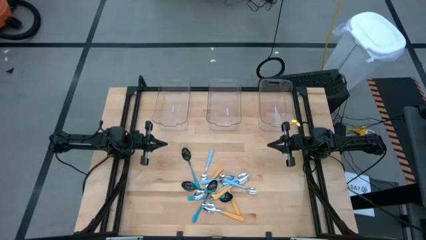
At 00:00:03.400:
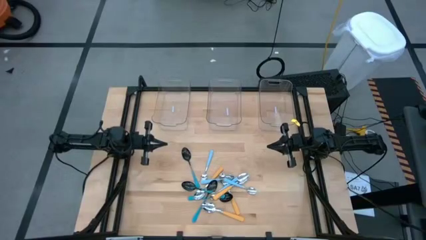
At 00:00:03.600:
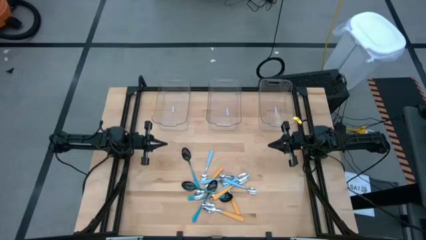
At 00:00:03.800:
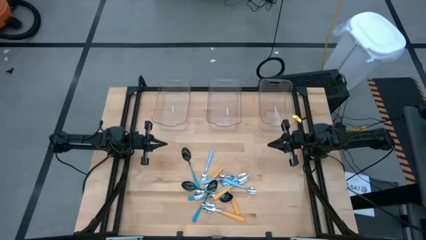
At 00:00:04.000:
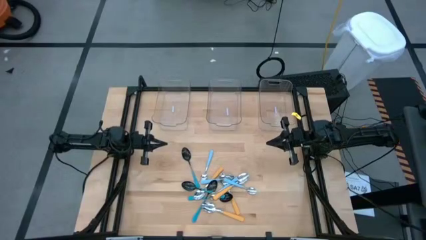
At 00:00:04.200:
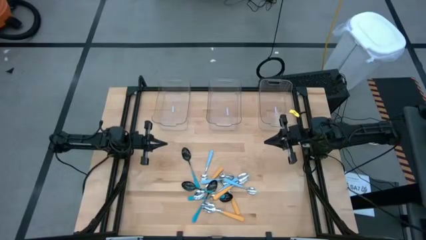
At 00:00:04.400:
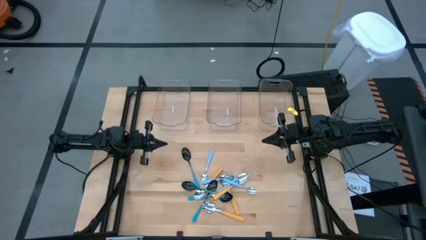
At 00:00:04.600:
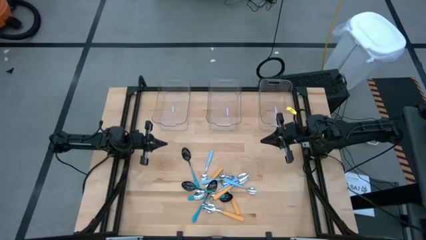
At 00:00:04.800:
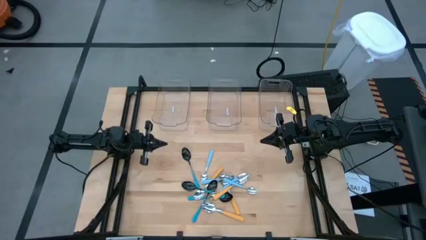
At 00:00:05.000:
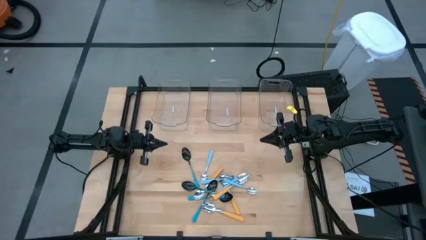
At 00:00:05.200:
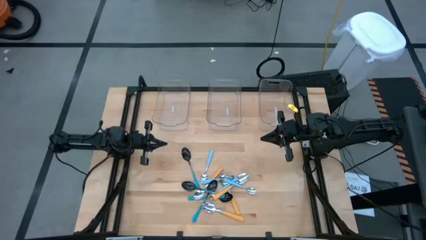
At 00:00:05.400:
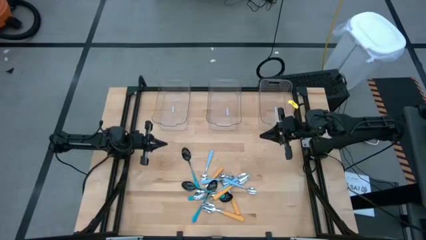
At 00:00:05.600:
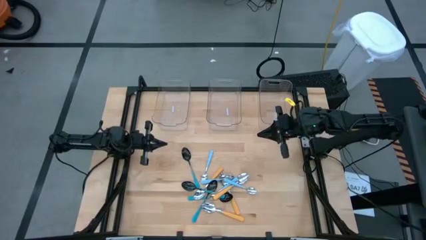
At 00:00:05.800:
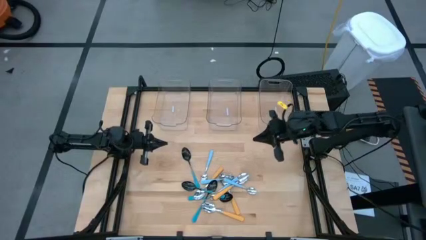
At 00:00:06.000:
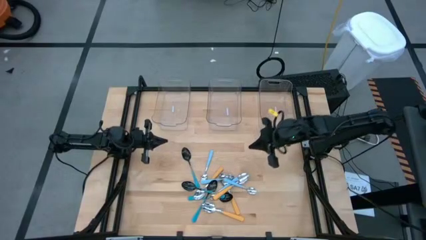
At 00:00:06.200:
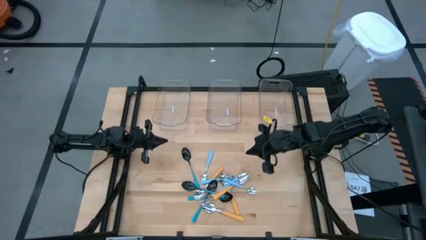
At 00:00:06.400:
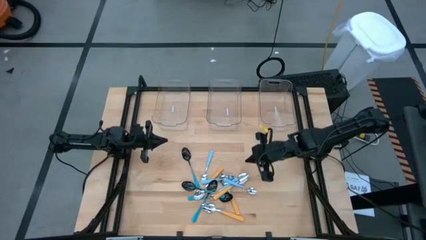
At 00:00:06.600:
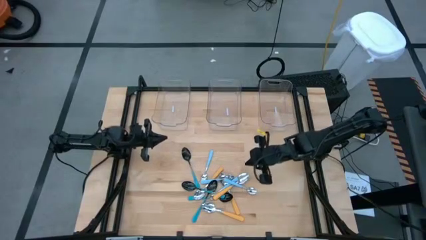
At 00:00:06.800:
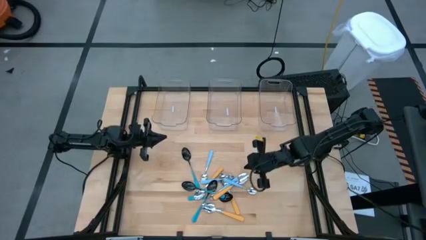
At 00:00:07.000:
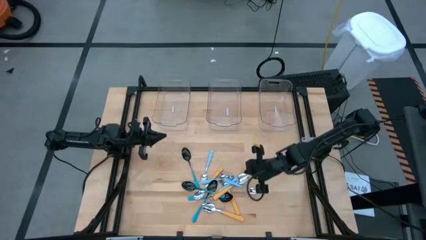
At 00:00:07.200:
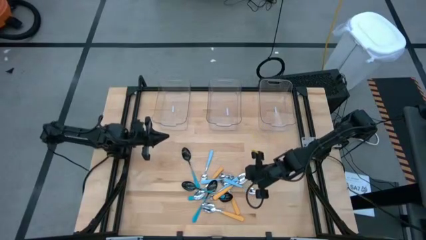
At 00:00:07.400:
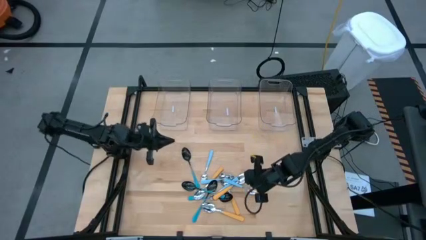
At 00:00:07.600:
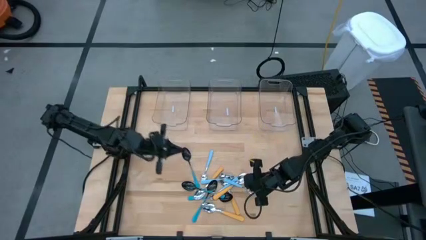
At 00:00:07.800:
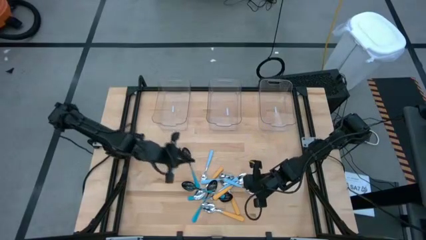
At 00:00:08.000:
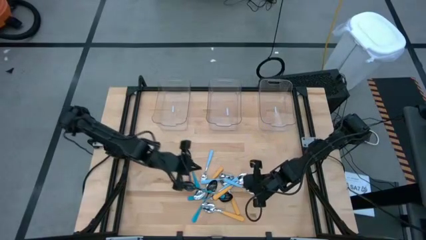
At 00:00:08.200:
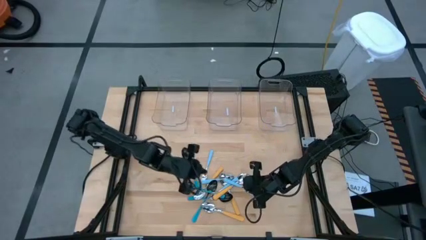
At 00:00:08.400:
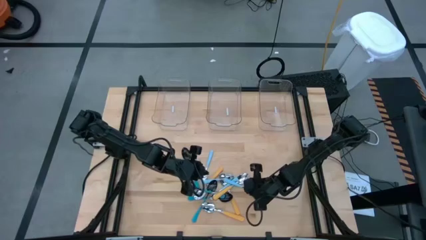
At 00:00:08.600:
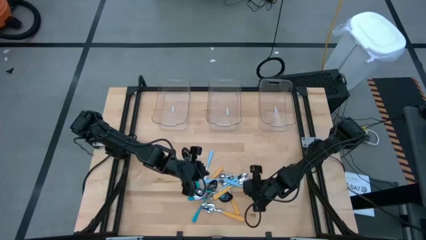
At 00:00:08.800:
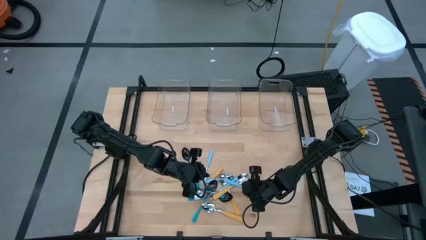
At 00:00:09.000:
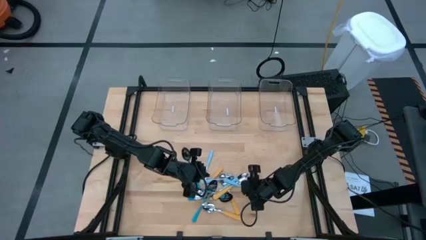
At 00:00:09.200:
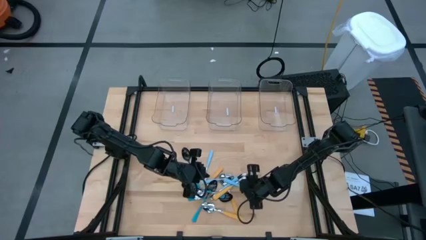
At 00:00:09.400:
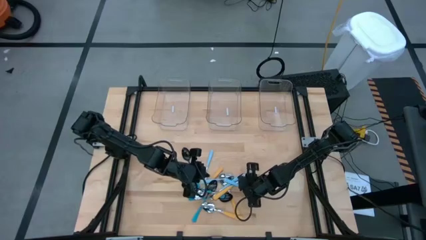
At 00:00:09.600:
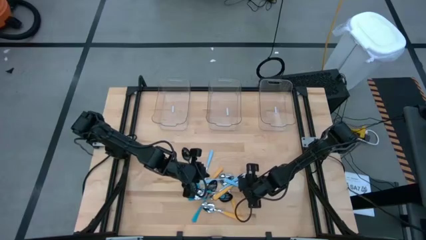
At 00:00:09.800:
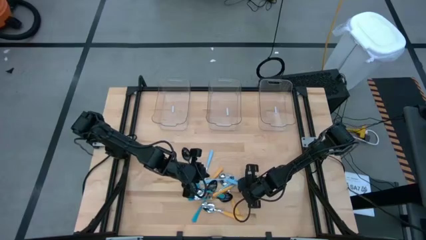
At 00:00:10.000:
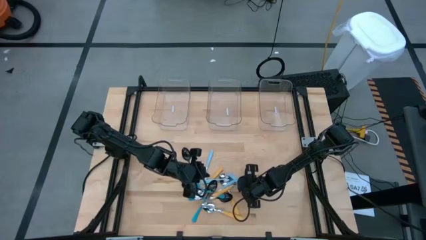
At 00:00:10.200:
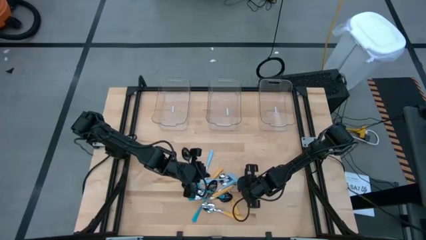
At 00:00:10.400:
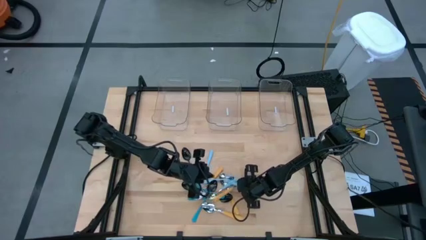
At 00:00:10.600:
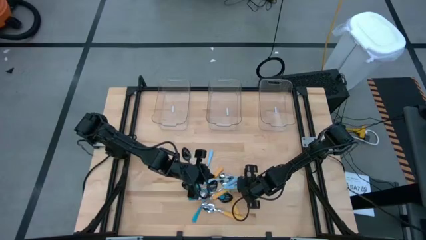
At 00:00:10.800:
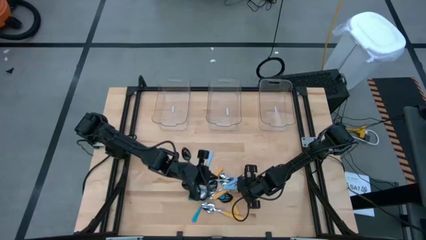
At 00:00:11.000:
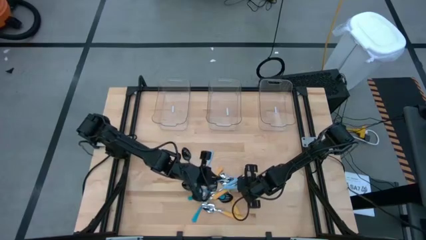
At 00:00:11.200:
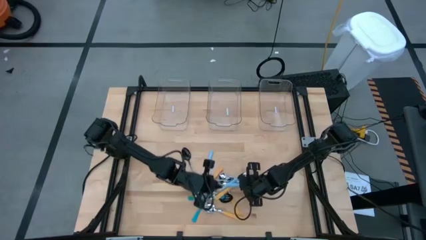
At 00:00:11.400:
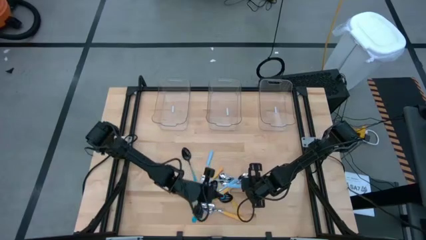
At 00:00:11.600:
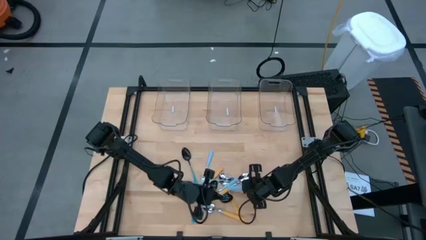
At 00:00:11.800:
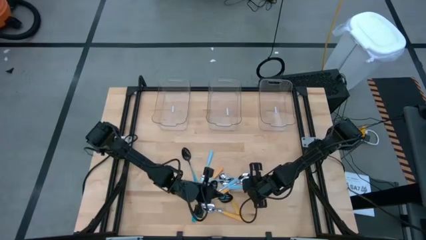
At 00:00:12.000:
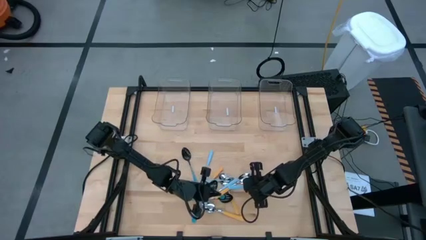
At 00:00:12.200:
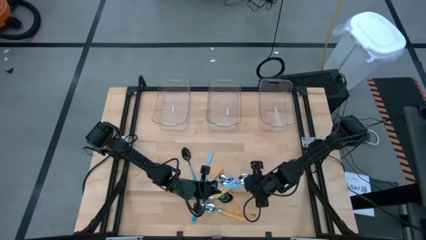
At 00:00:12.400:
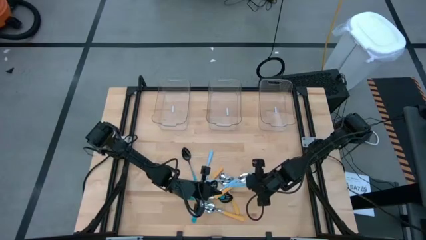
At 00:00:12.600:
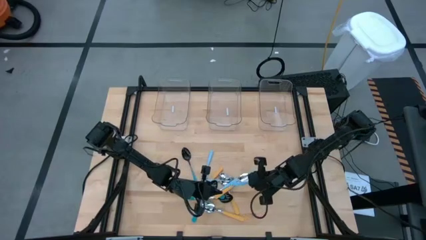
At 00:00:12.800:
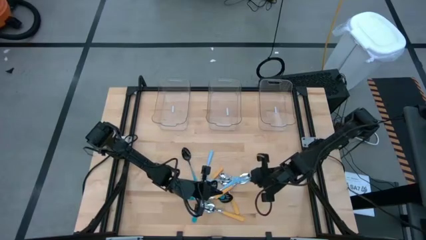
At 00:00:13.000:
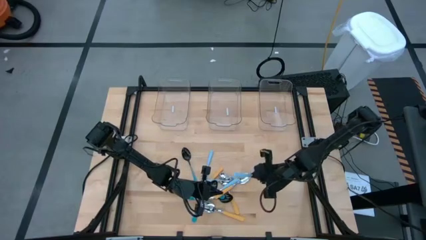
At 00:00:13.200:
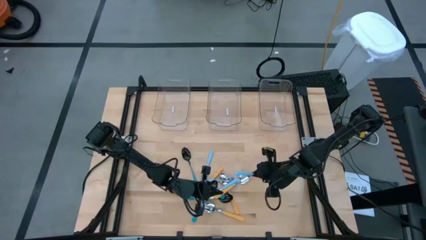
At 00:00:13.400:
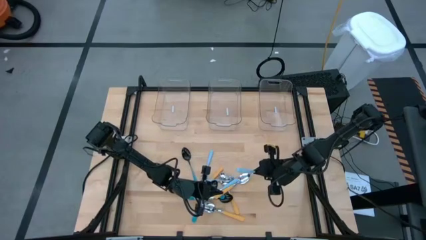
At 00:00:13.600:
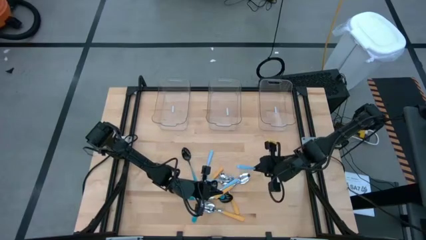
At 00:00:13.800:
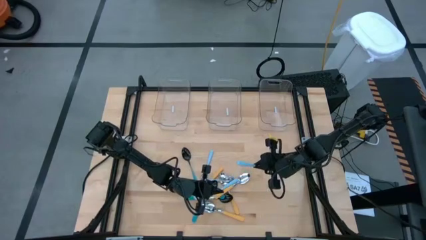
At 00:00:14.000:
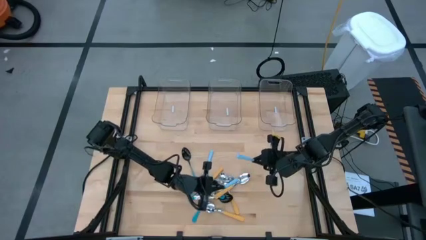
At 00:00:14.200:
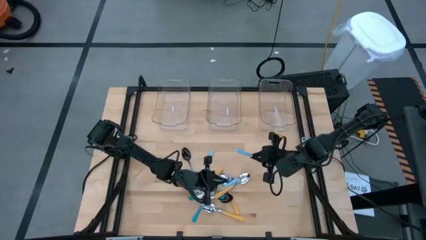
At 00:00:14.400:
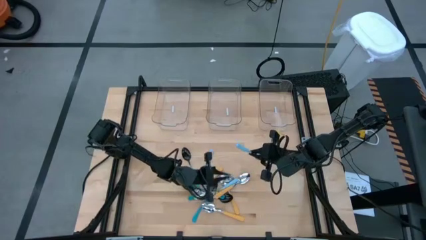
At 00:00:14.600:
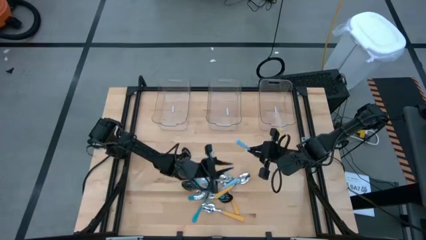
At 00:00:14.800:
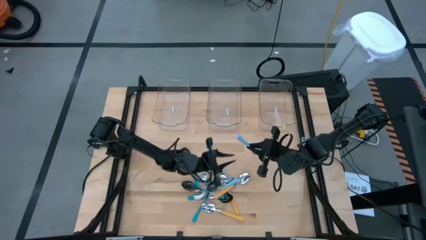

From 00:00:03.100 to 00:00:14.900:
Task: Sort silverware by color (type)
Put the light blue spoon into the right transparent bin

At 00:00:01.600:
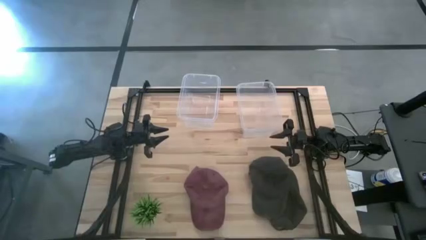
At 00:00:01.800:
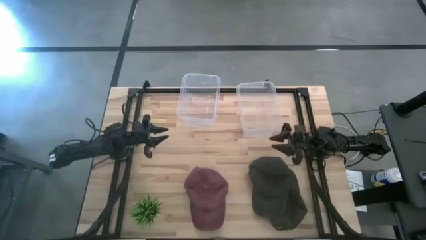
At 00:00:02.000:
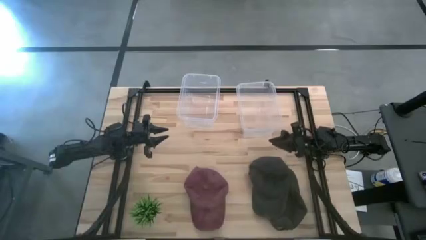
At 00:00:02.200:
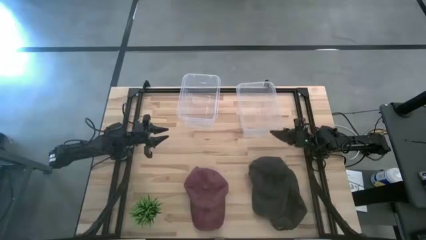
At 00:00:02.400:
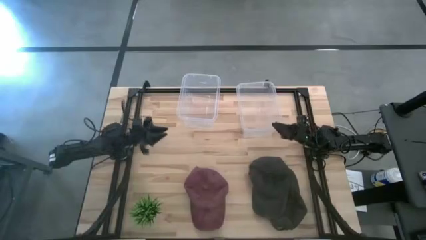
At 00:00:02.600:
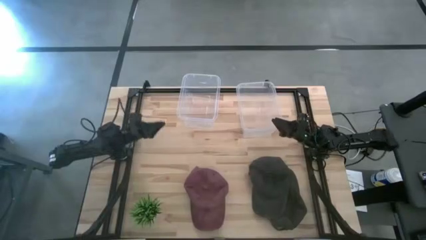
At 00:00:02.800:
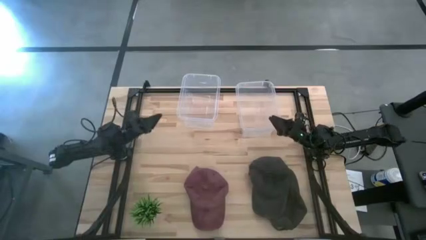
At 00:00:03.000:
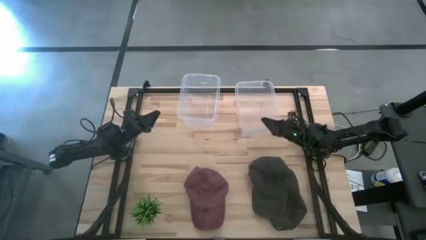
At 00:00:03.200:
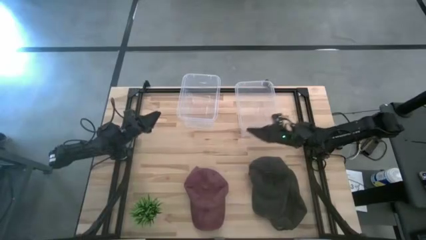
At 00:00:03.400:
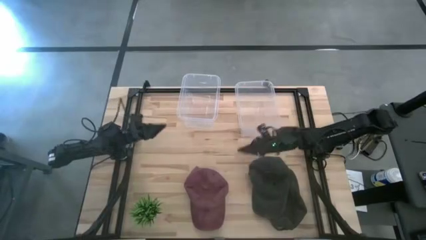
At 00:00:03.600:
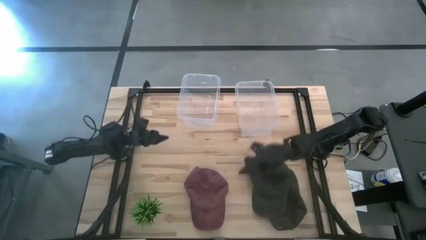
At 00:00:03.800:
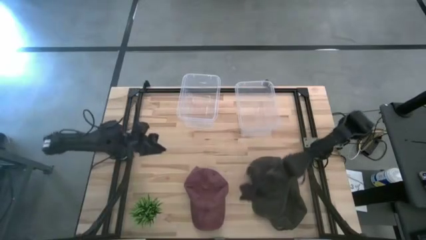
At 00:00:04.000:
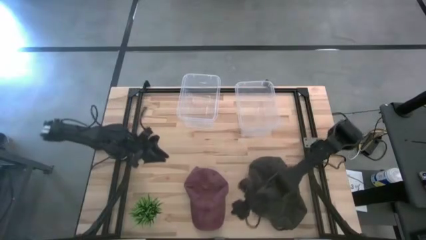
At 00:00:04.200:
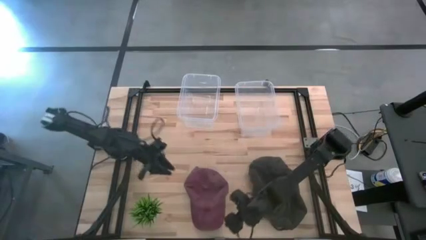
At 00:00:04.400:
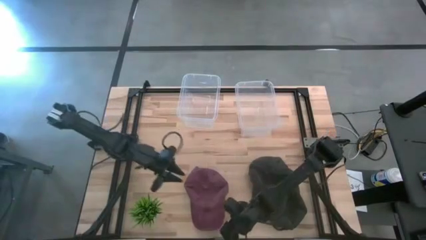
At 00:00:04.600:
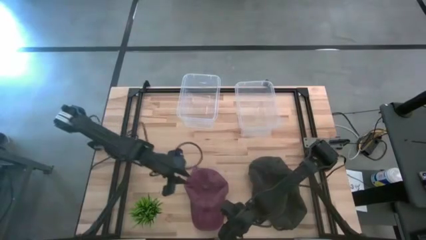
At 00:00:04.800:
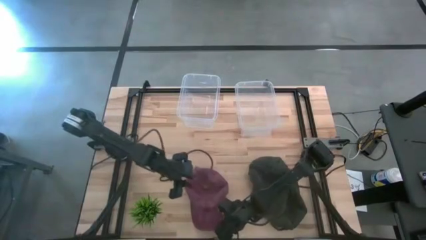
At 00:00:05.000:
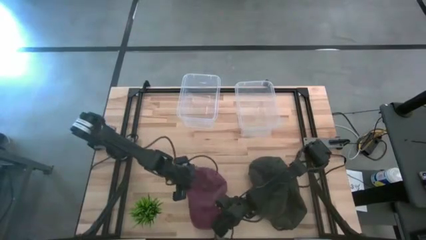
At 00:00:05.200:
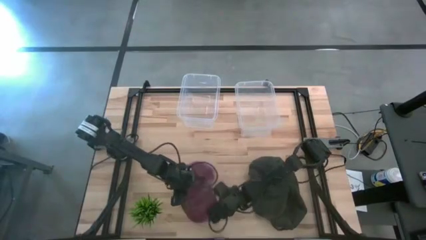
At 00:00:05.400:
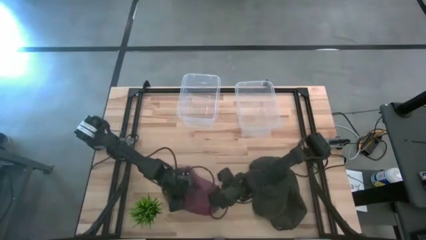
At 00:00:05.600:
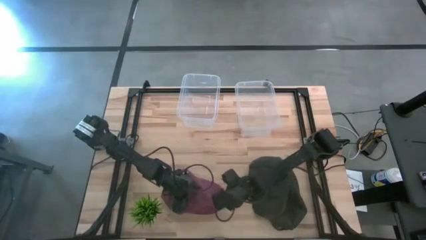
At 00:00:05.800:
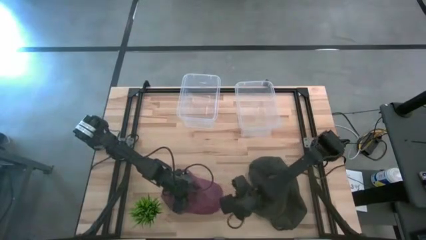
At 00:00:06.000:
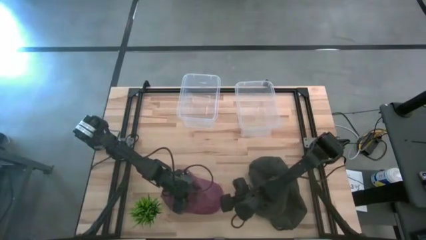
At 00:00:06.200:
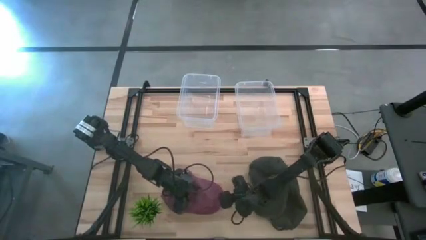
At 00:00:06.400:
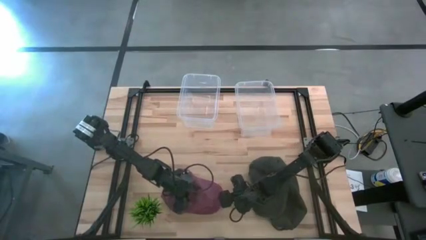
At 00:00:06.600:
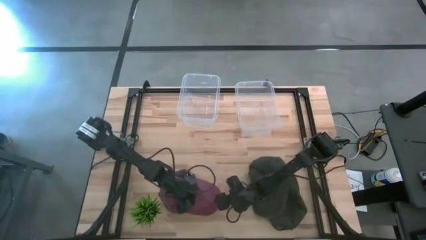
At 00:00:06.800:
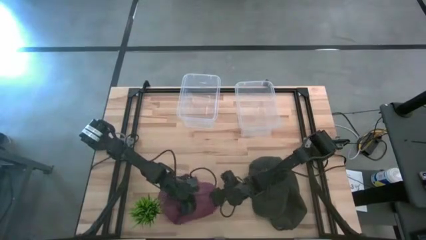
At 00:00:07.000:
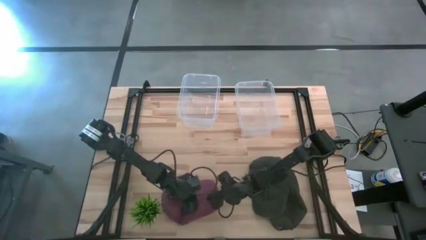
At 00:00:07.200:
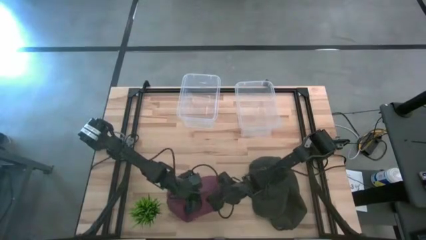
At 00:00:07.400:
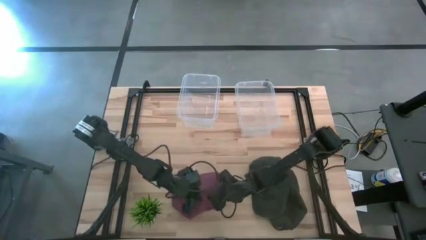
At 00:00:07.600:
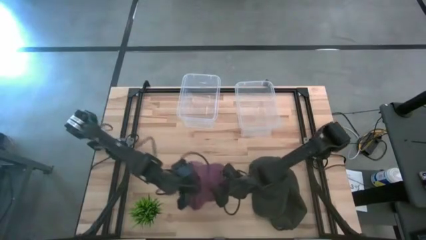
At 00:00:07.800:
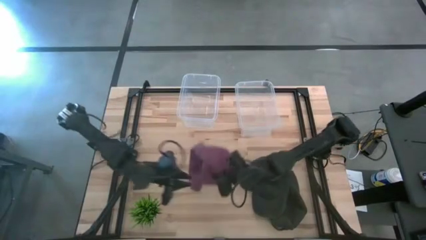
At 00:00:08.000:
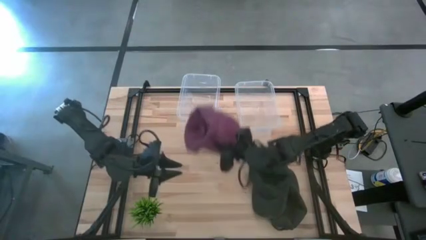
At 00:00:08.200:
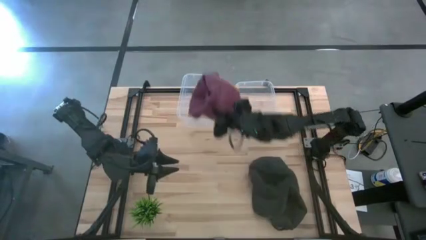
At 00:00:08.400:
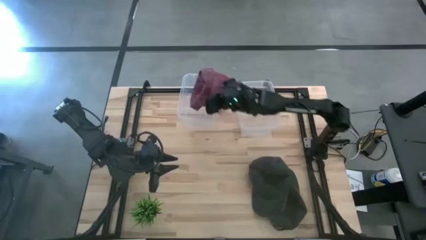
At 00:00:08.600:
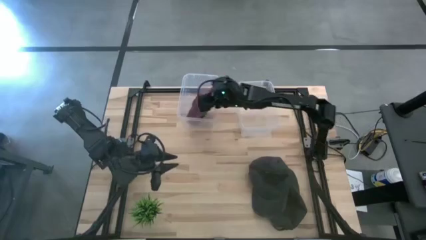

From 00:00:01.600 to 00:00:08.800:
Task: Pick & Place hat
Put the red cap into the left transparent bin
